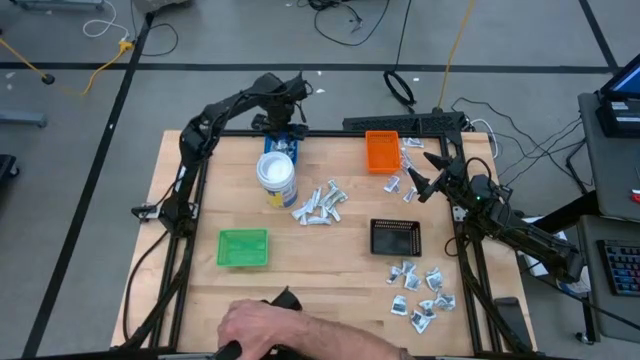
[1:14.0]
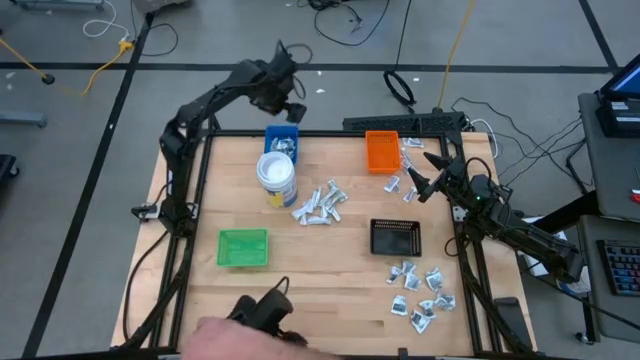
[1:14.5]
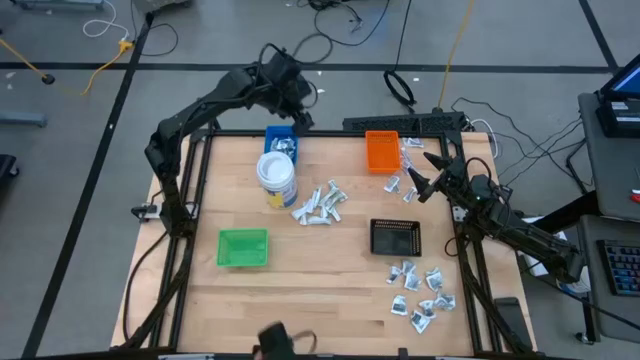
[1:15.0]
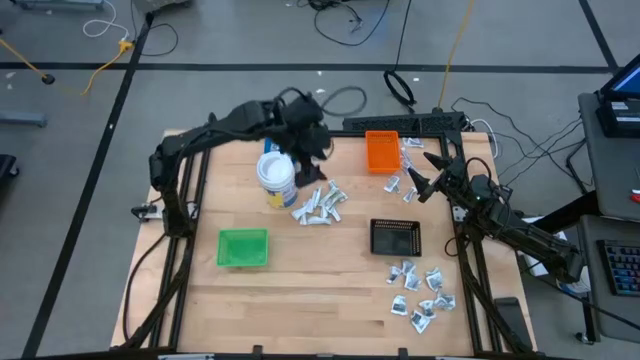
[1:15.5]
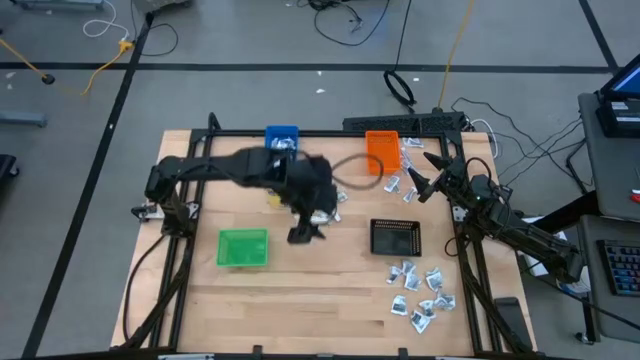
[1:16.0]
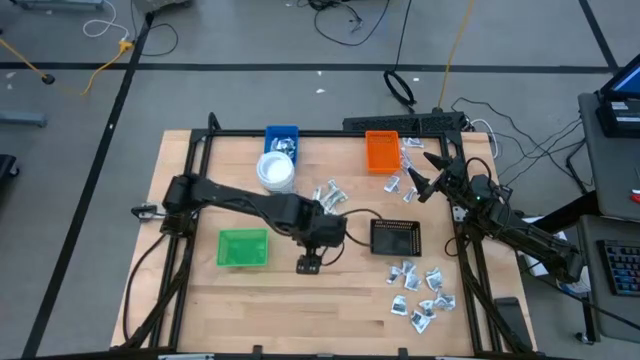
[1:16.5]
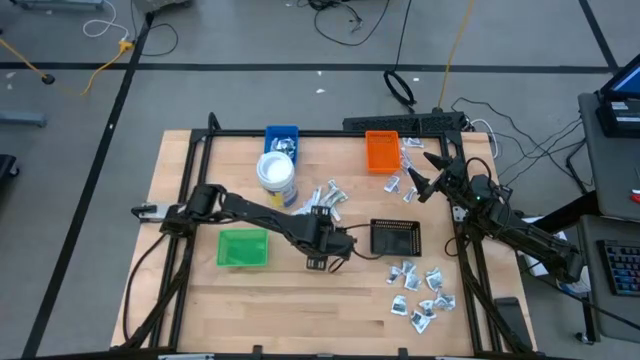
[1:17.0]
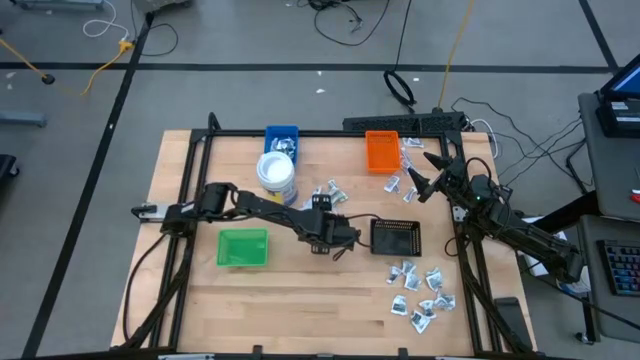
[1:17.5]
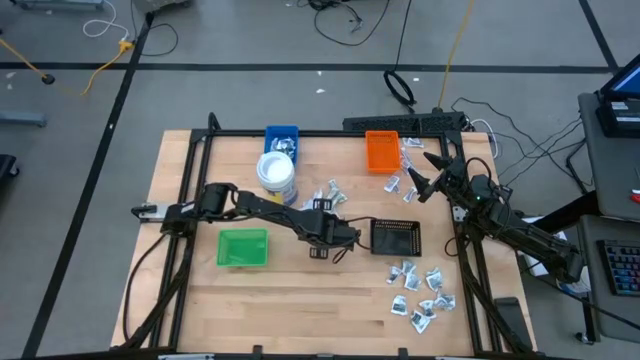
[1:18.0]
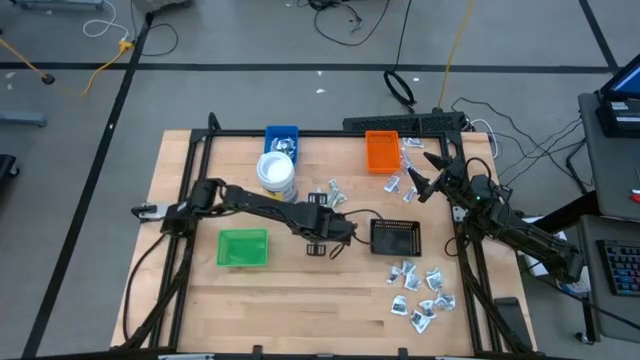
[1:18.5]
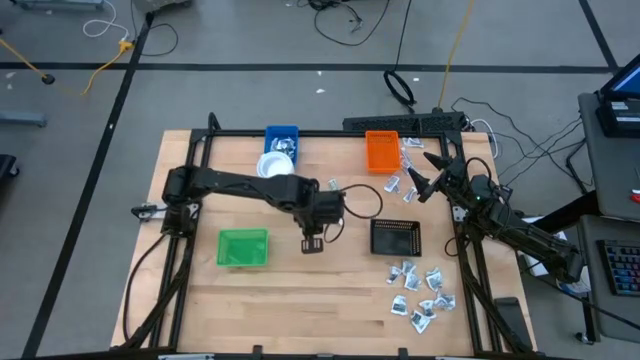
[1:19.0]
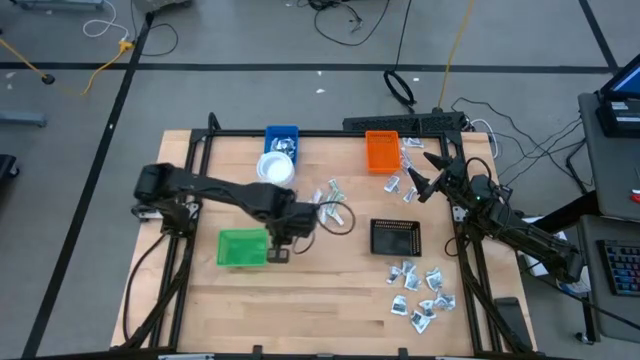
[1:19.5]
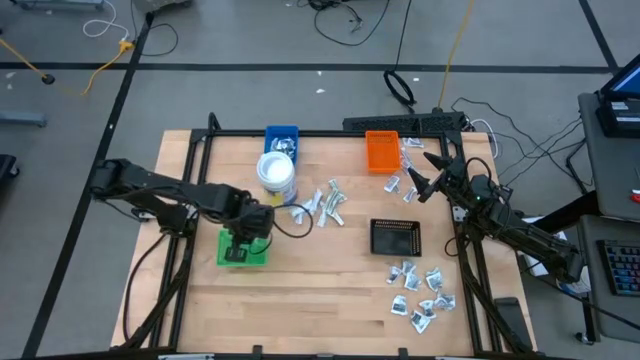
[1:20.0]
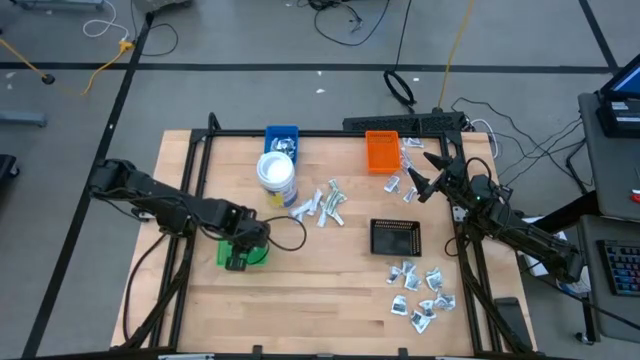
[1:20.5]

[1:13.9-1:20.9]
Task: Pick & Place First Aid Supplies
Put the green bandage pack into the green bin

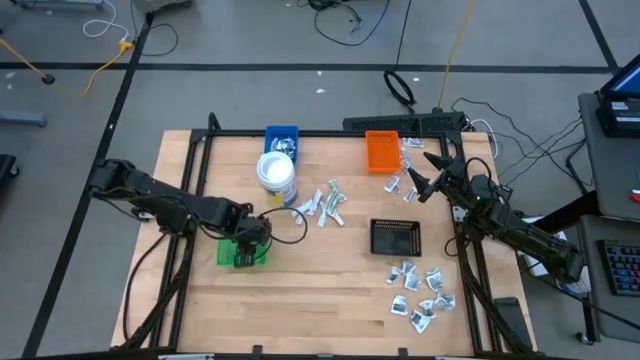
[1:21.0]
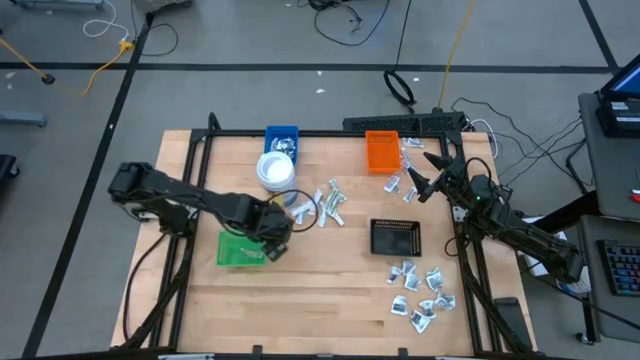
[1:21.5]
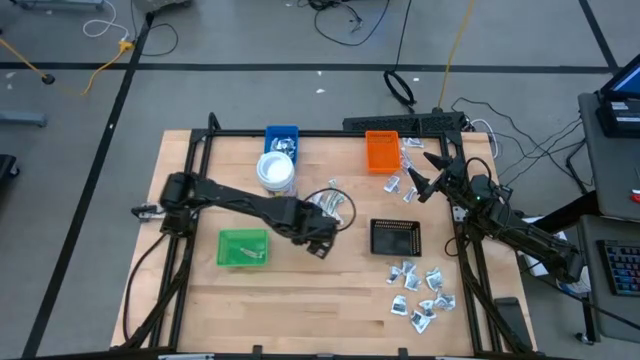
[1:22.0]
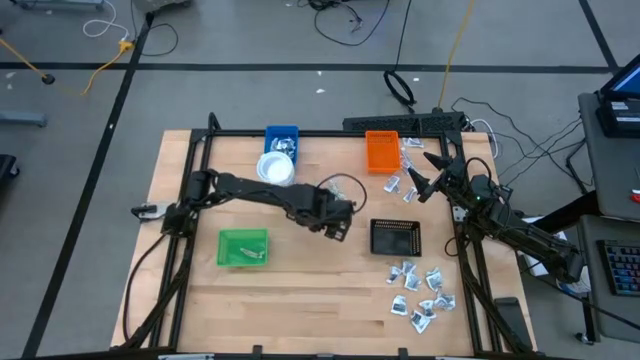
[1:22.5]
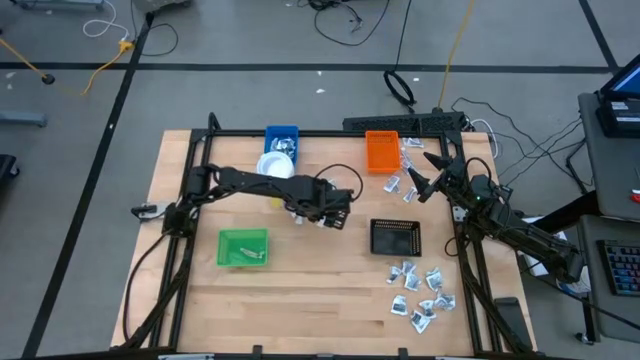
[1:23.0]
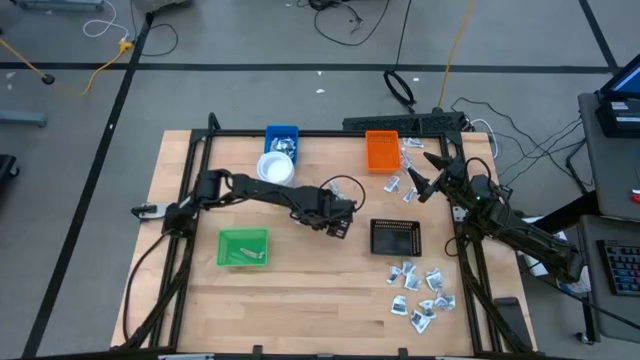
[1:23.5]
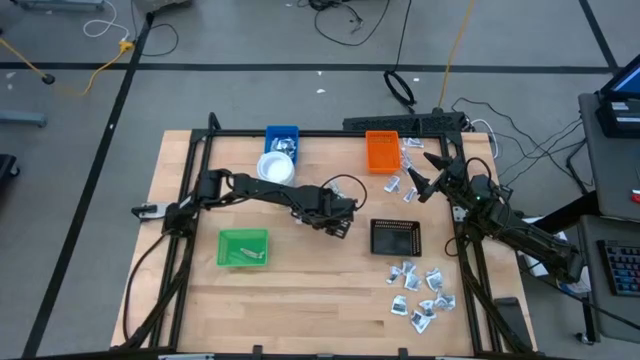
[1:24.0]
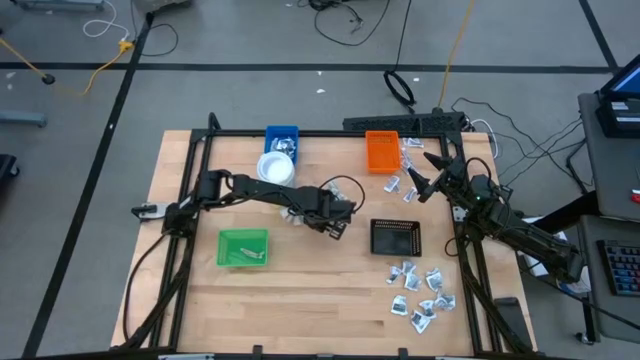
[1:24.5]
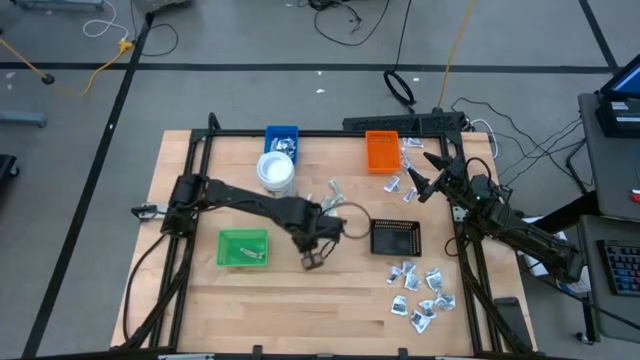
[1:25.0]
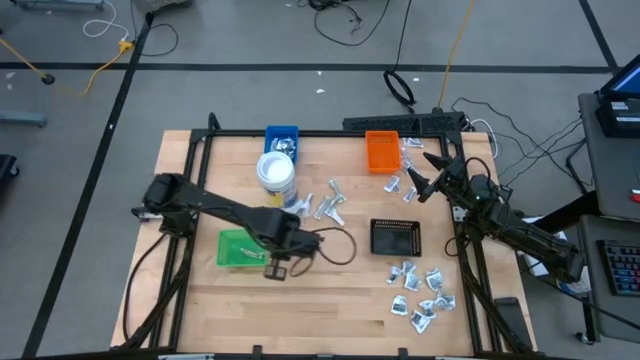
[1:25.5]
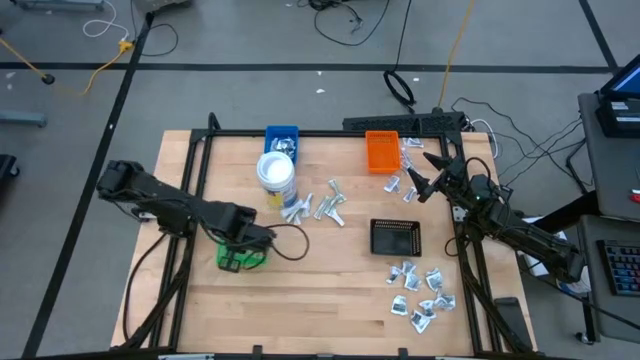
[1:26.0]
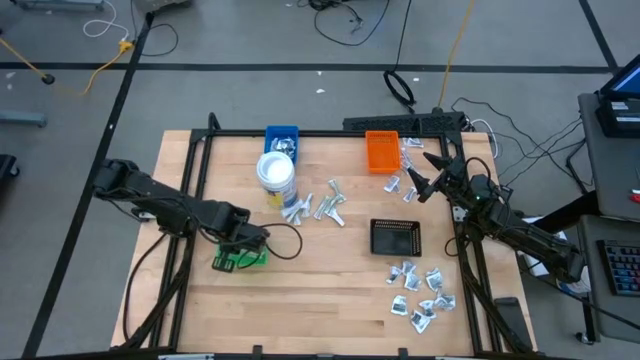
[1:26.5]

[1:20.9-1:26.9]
Put the green bandage pack into the green bin

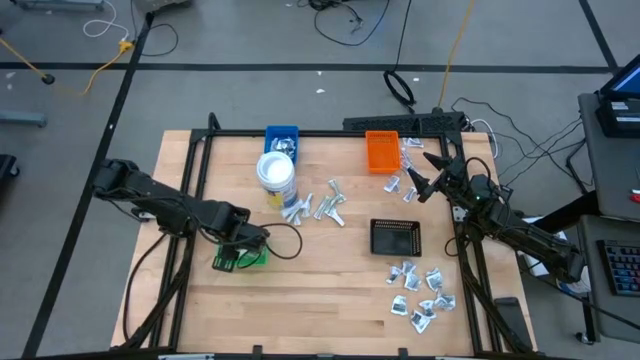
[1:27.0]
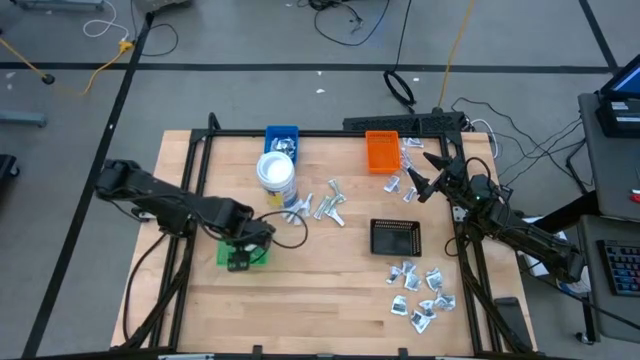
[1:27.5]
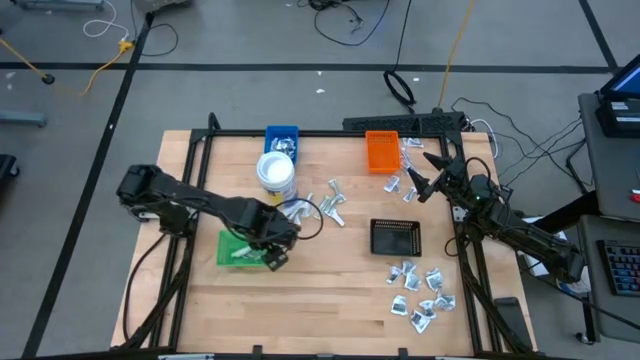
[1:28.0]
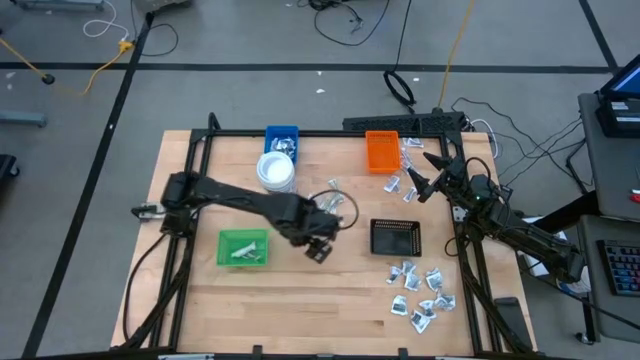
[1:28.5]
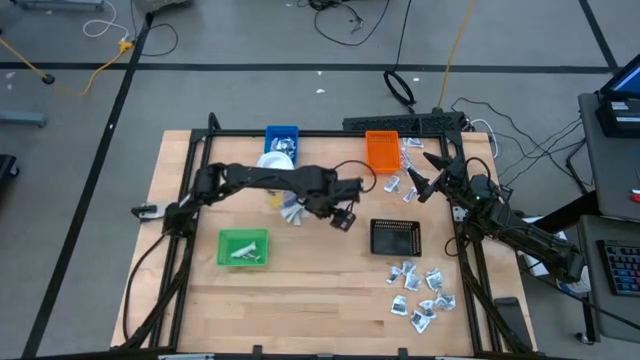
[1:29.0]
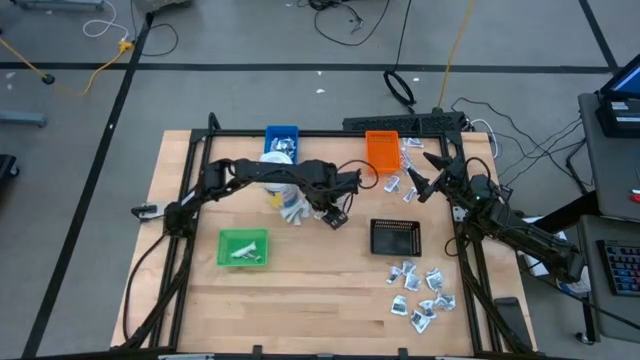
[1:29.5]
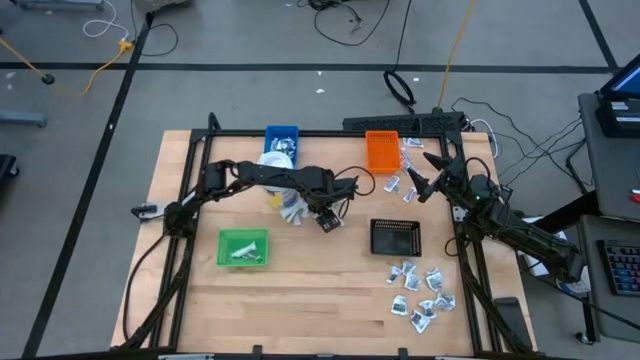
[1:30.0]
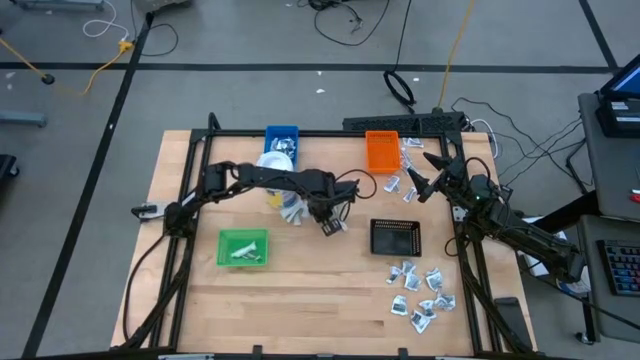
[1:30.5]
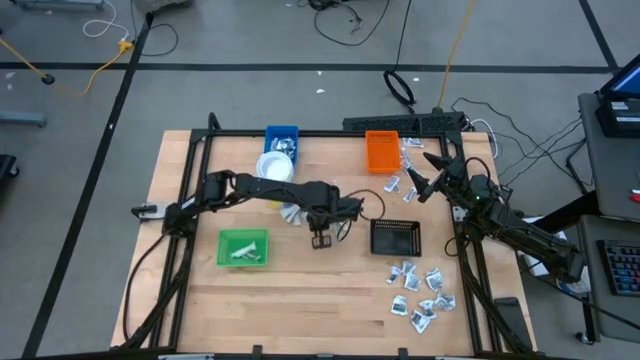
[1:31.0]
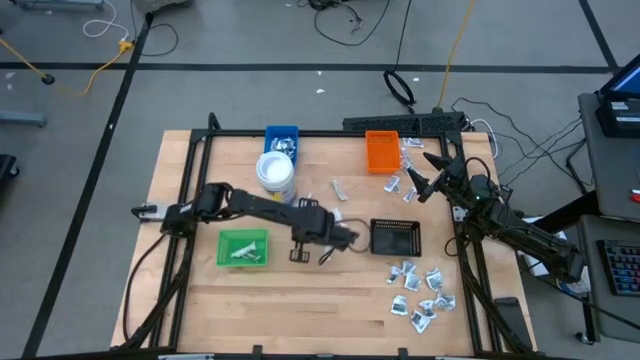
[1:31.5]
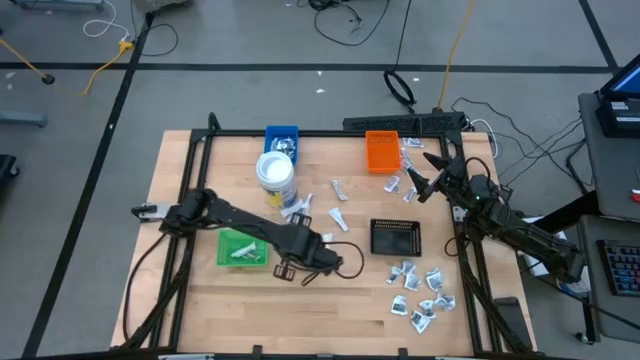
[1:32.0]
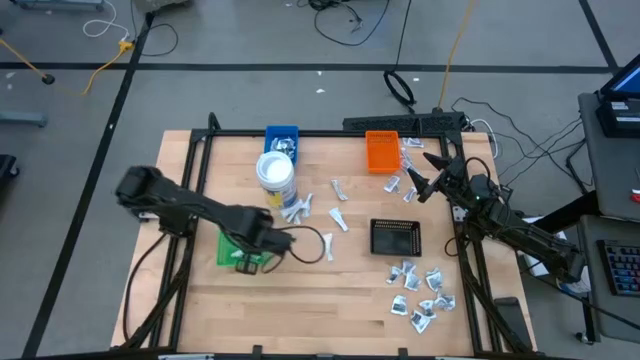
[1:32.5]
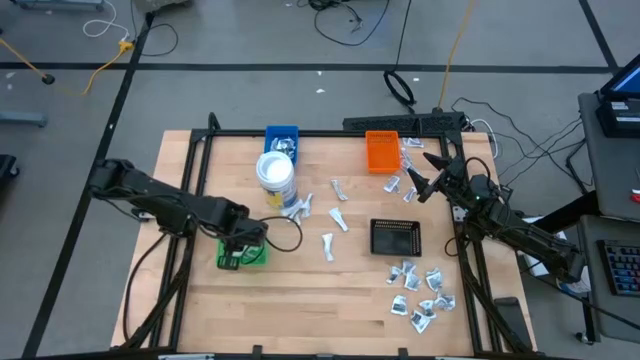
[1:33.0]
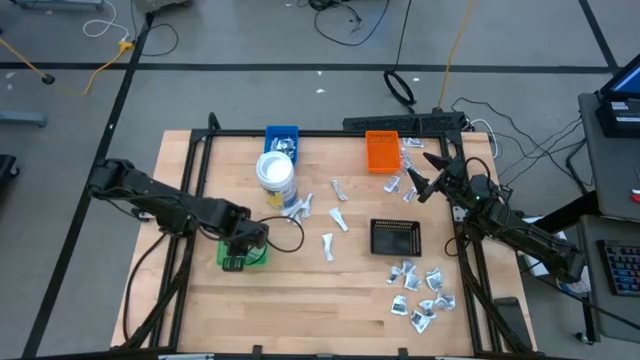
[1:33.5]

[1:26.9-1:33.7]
Put the green bandage pack into the green bin

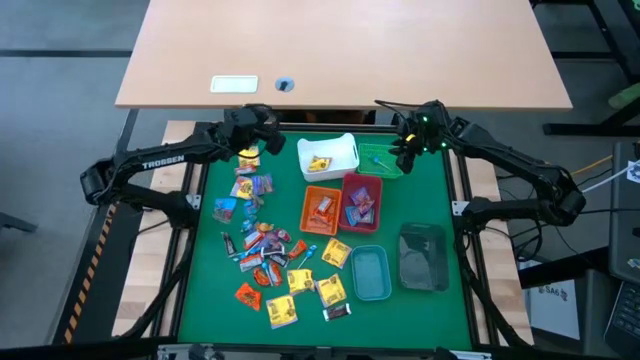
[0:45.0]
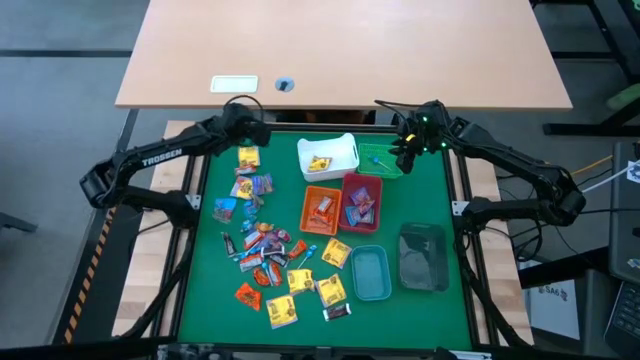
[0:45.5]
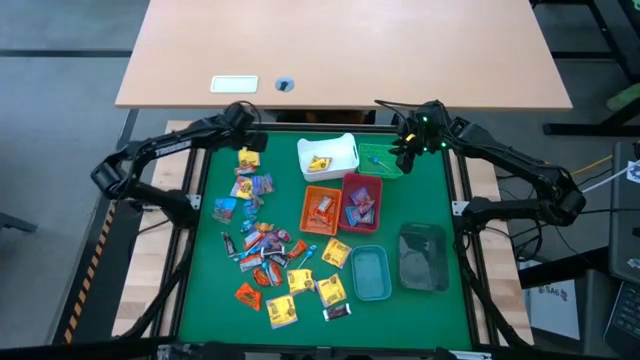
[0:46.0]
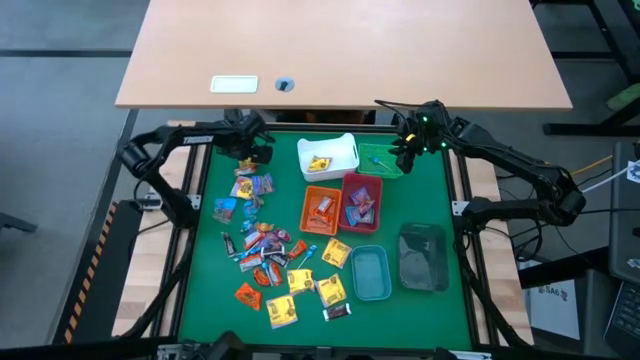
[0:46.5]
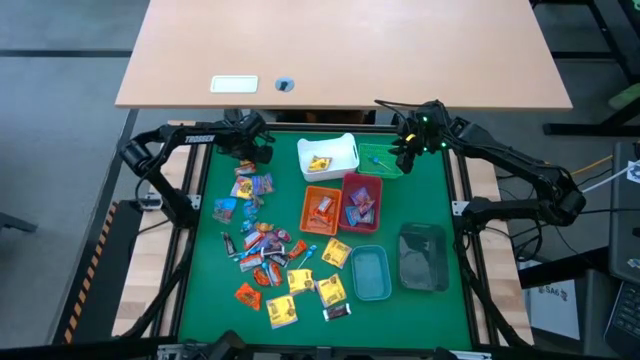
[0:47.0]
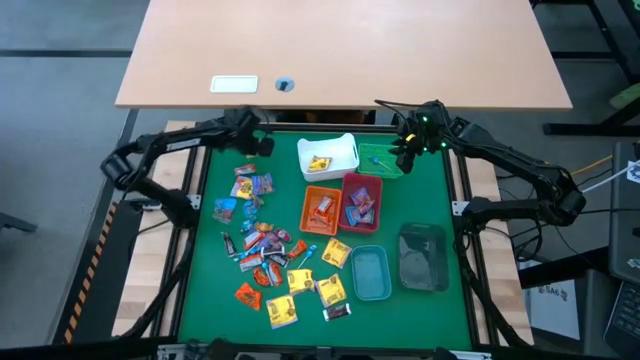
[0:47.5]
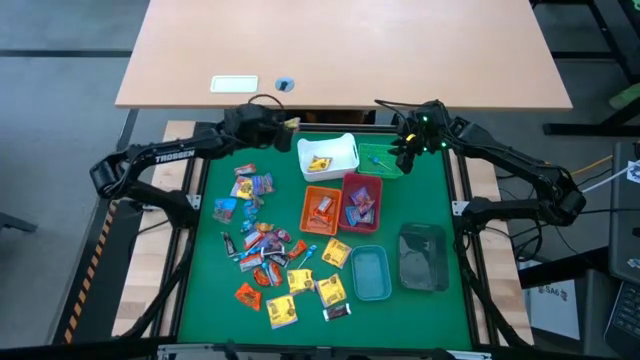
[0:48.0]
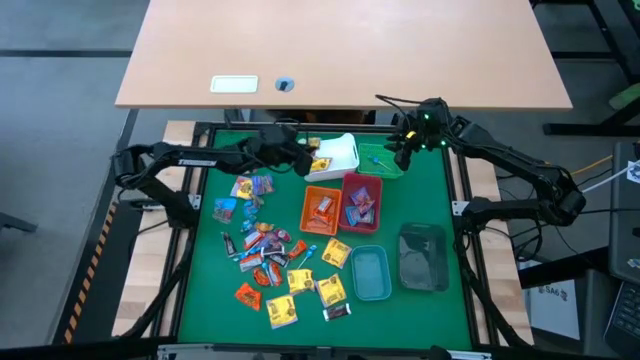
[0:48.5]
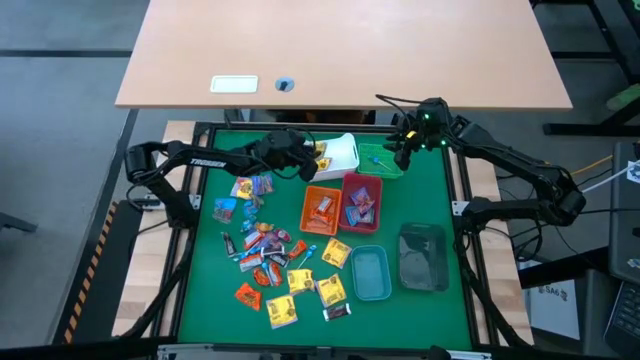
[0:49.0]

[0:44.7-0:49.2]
Task: Sort candy
Put the yellow bag of candy into the white bin
